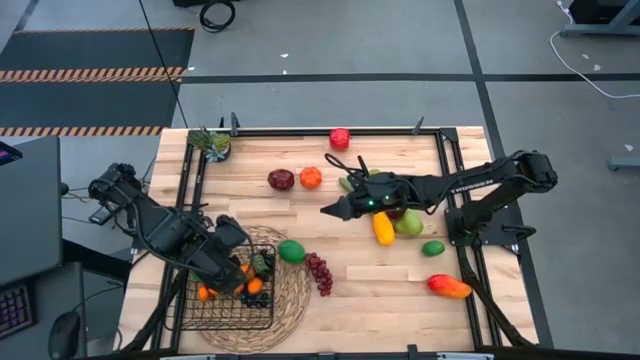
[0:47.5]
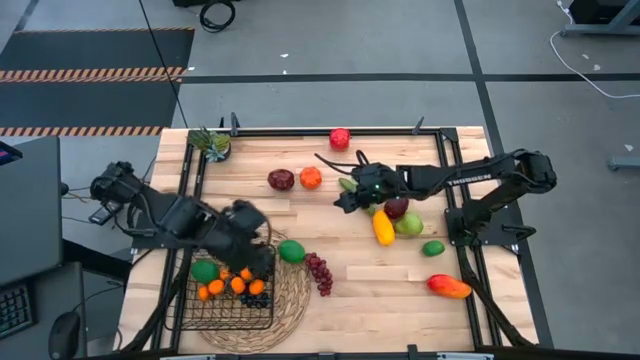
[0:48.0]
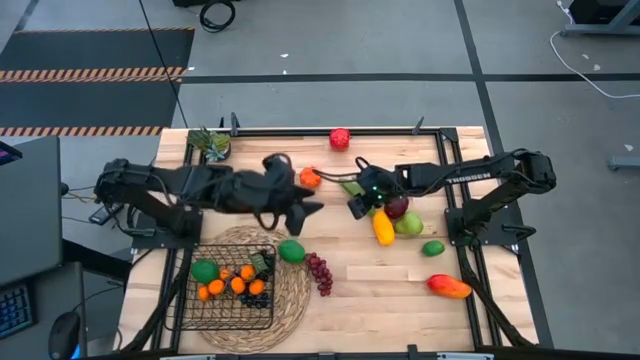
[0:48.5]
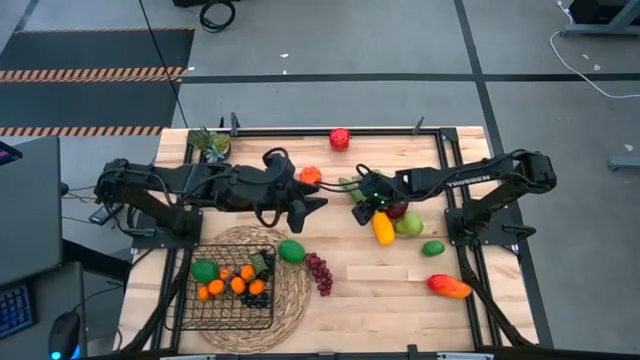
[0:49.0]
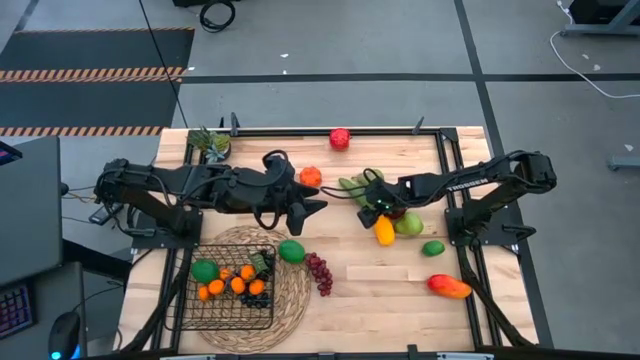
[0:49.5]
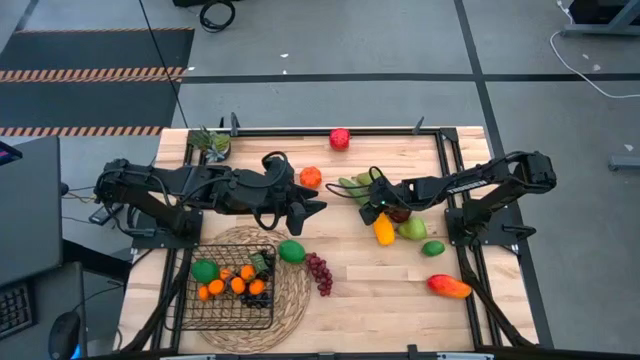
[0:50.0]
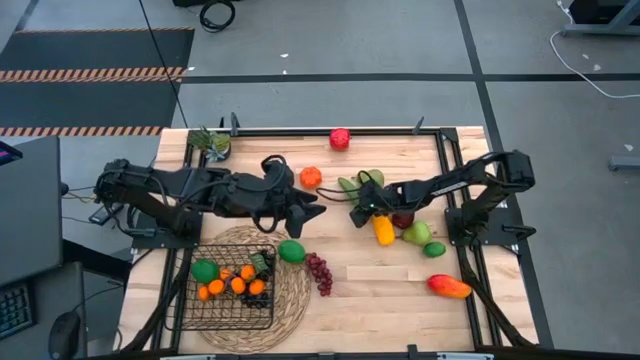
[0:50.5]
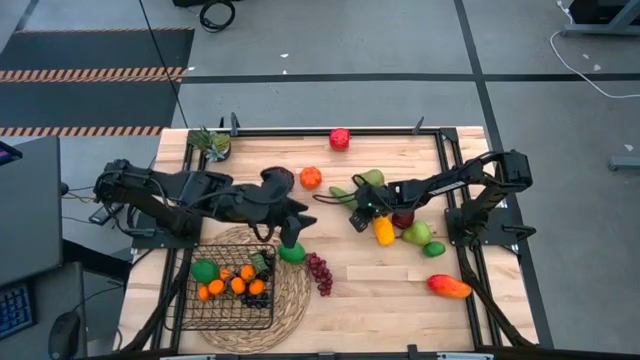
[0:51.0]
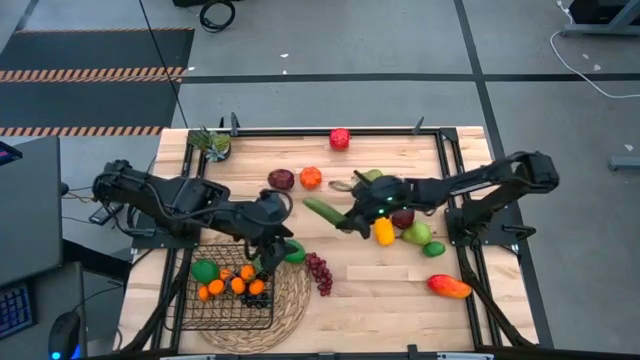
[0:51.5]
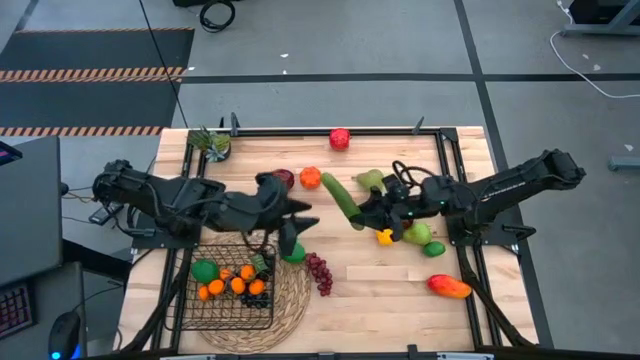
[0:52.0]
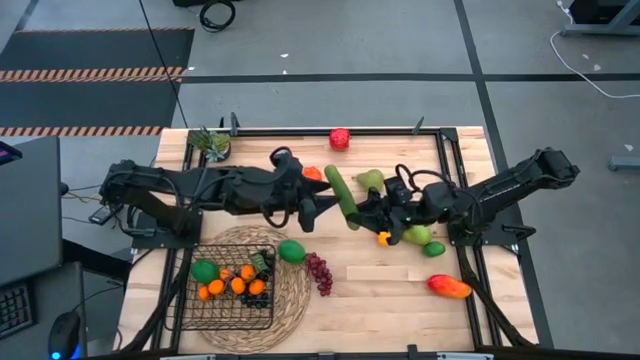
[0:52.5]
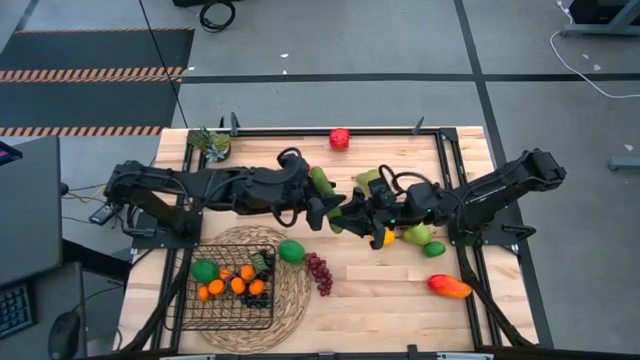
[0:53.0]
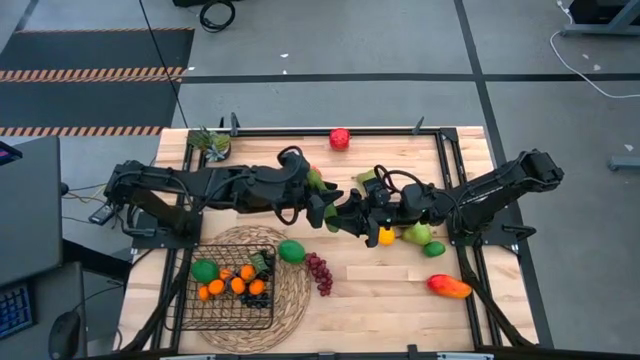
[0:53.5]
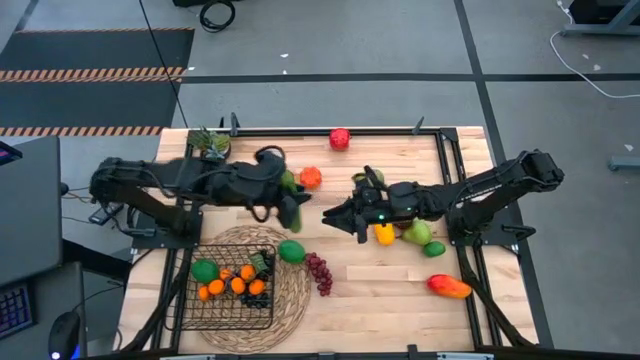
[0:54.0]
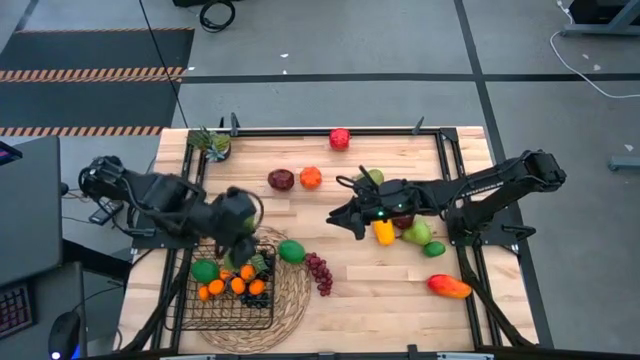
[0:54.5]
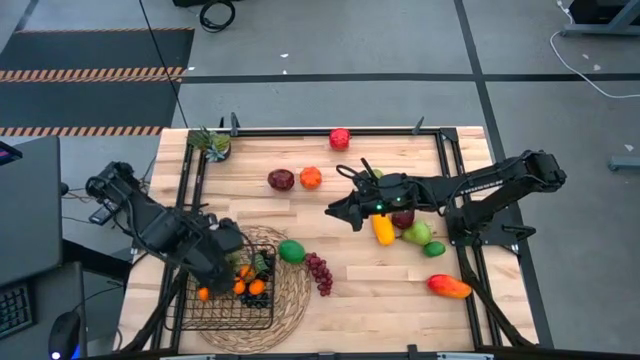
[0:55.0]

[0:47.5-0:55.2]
Task: Build produce basket
Put the cucumber into the black wire basket

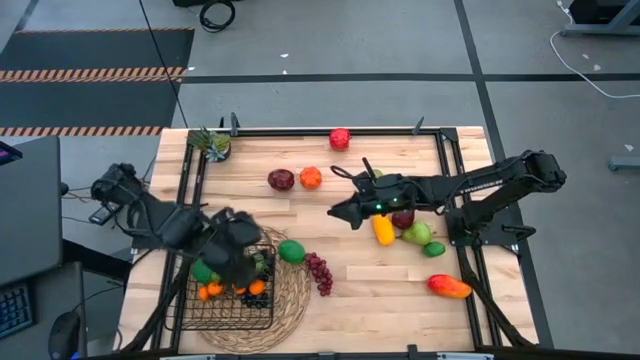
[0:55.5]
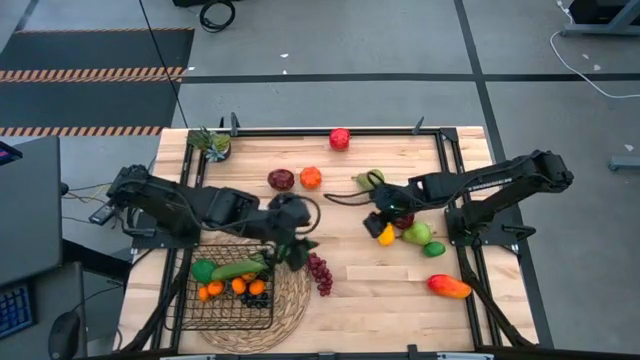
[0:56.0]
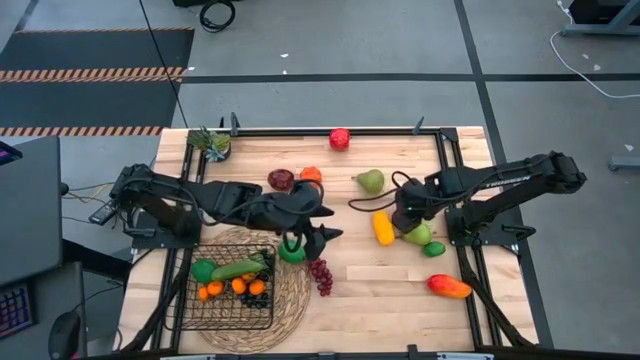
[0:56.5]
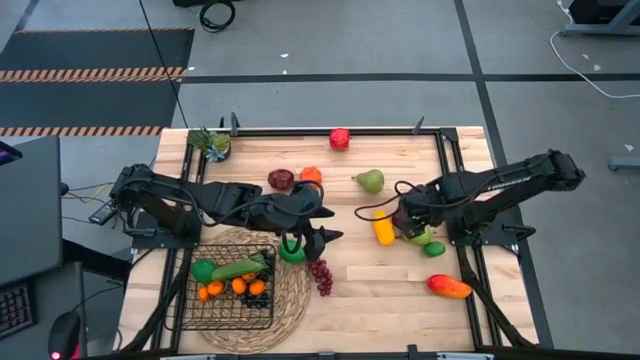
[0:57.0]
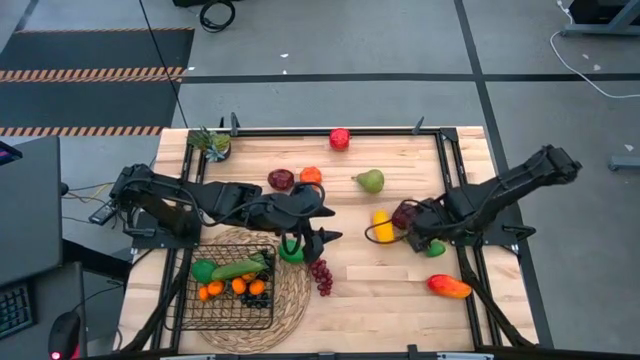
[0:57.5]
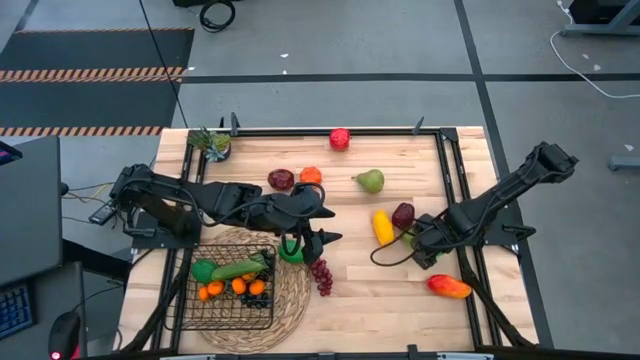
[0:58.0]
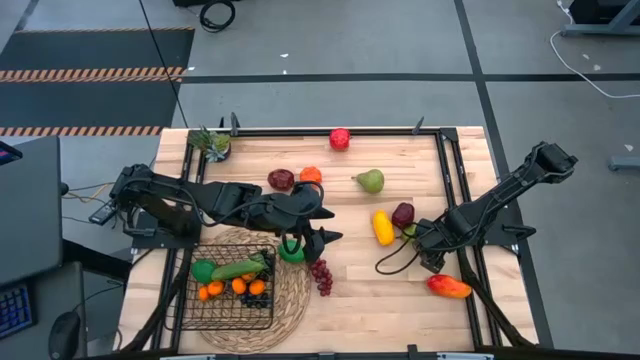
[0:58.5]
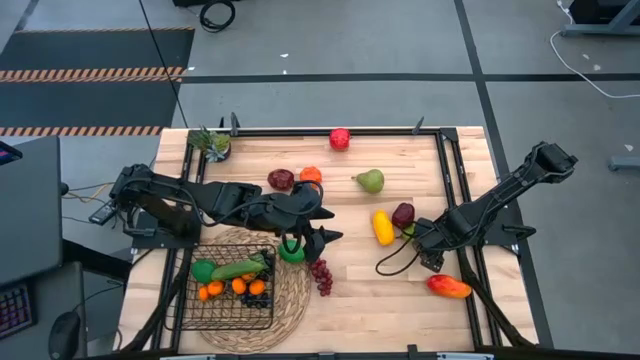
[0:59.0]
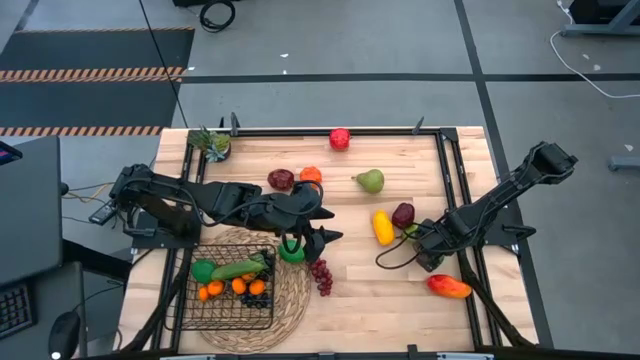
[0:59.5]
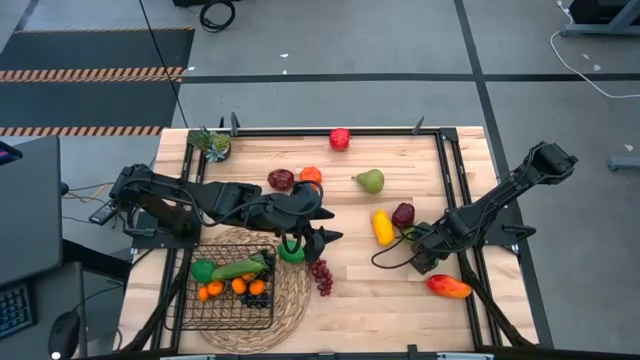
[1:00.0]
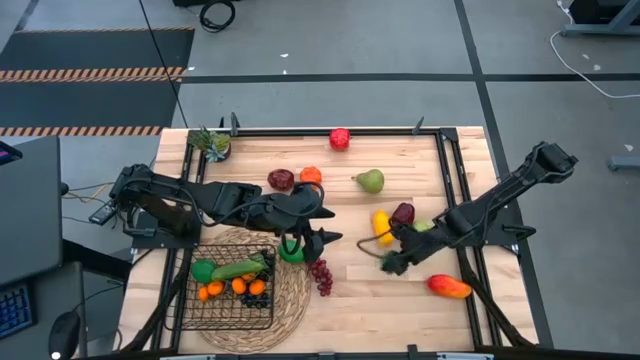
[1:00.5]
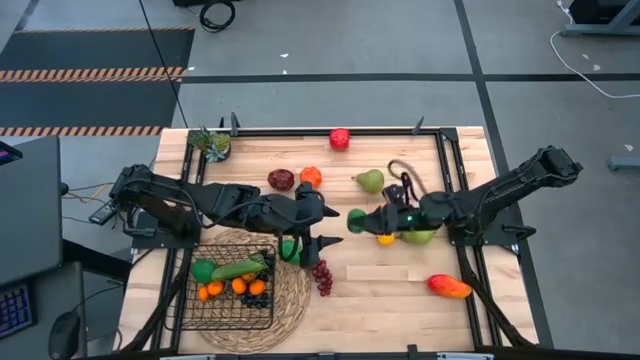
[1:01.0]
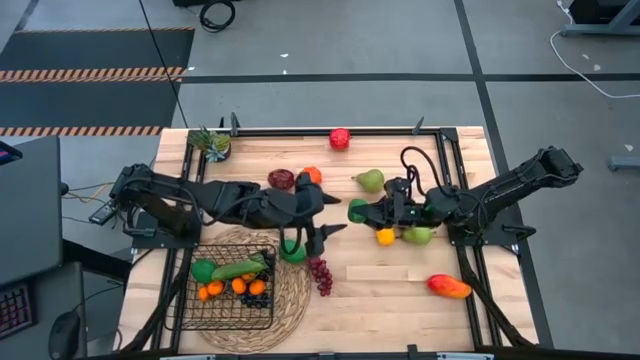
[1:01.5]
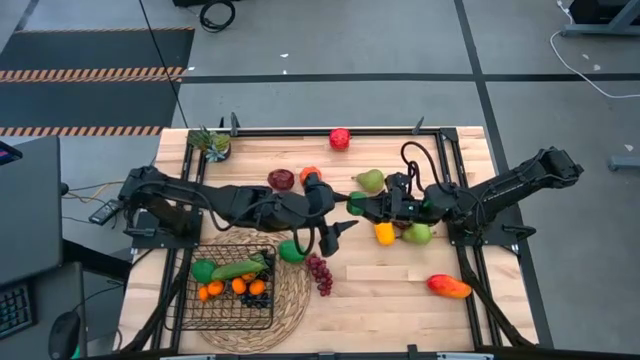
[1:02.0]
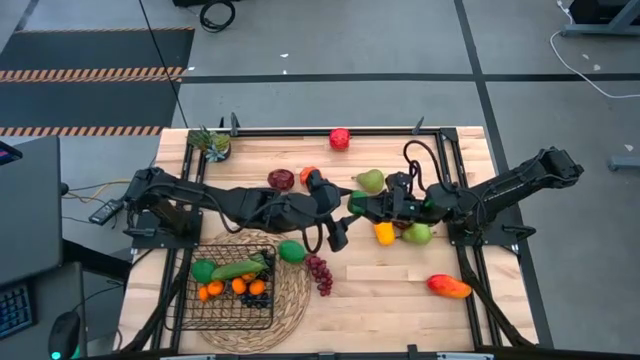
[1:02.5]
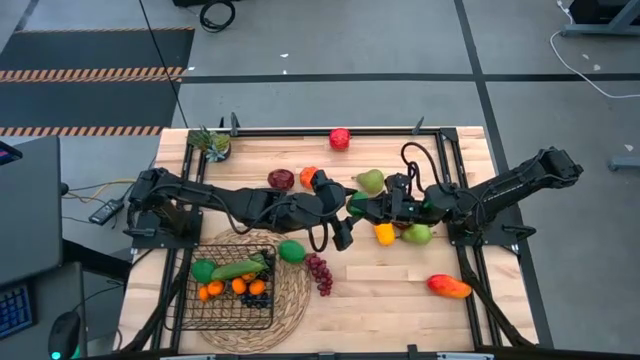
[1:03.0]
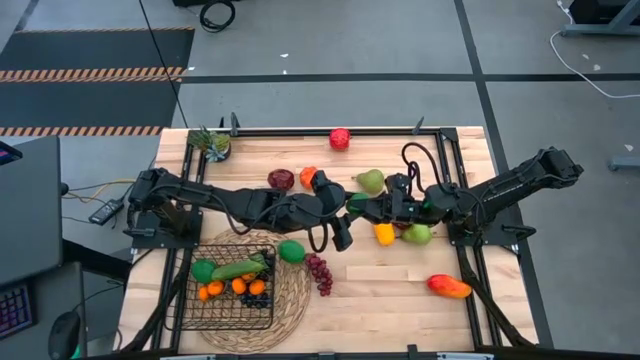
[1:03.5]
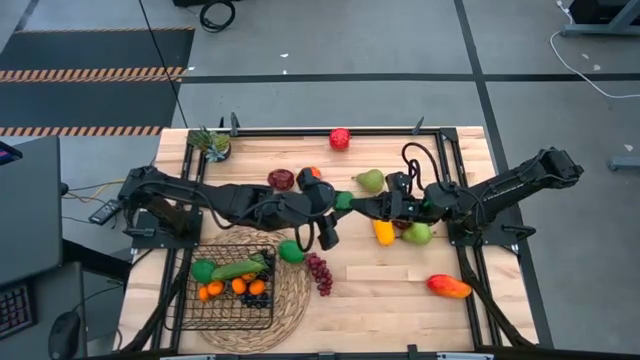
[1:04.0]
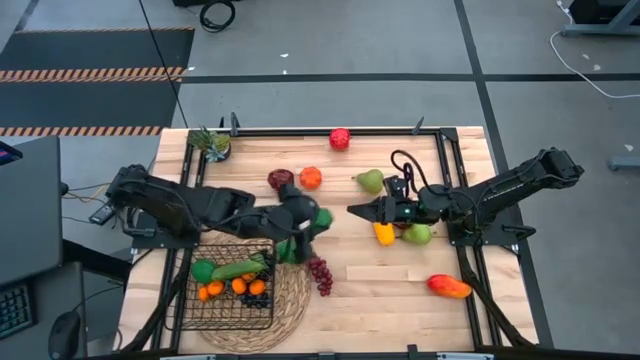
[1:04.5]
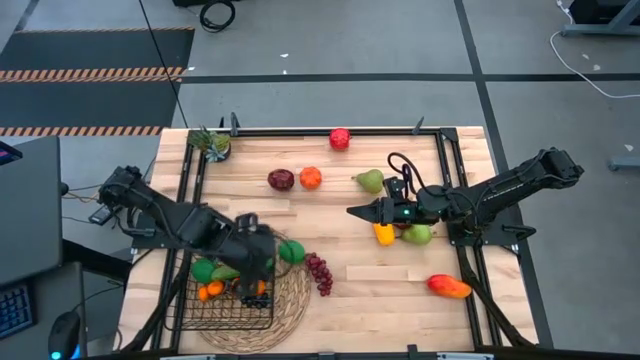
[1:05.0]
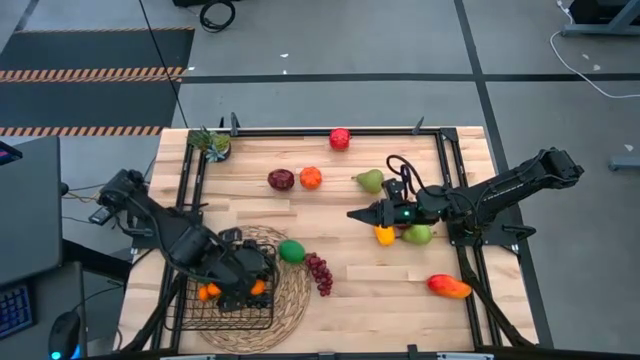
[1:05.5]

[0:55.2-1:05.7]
Put the right lime into the black wire basket

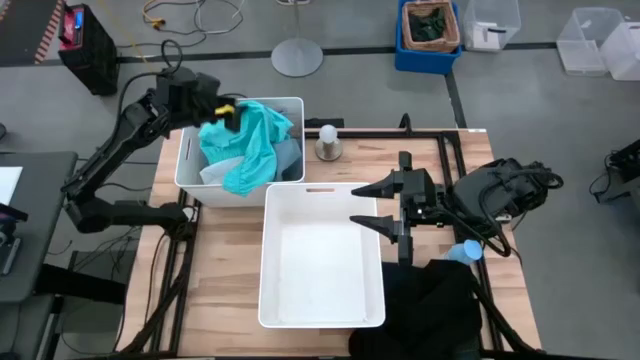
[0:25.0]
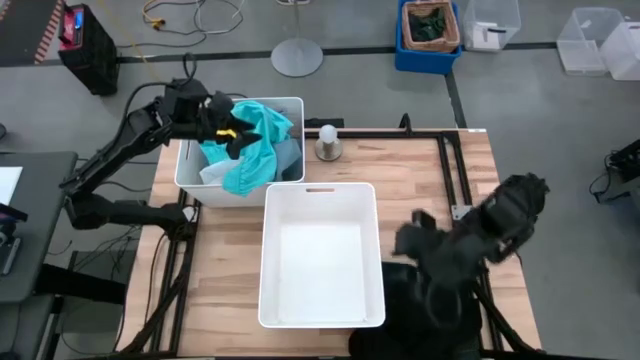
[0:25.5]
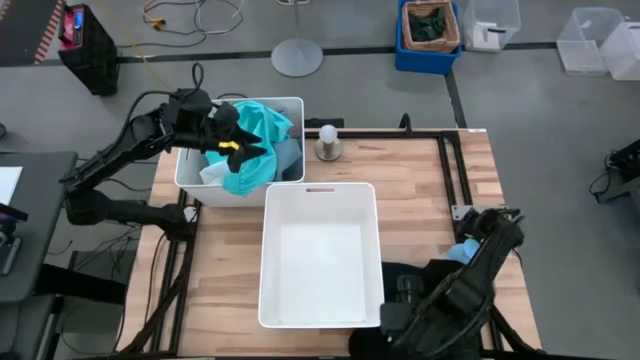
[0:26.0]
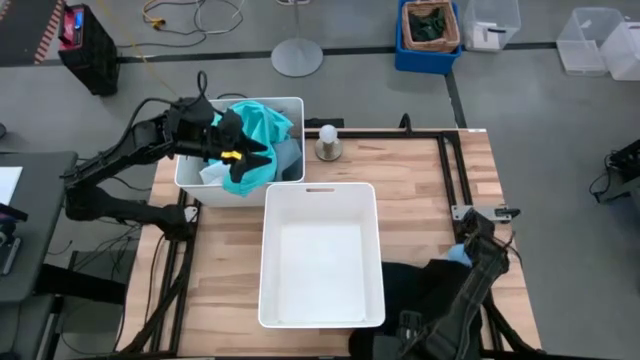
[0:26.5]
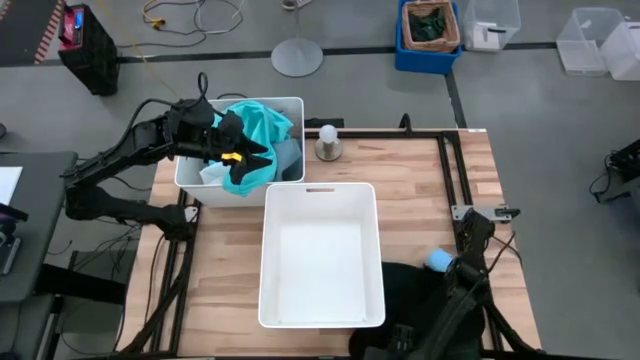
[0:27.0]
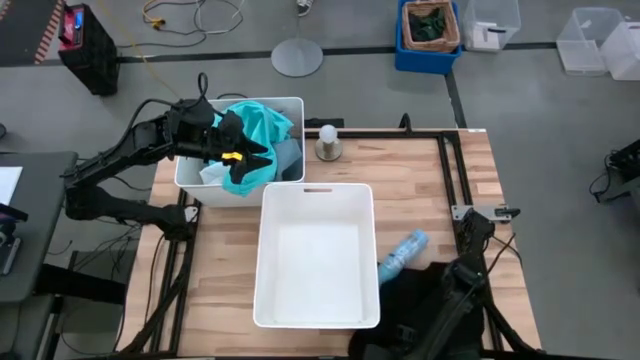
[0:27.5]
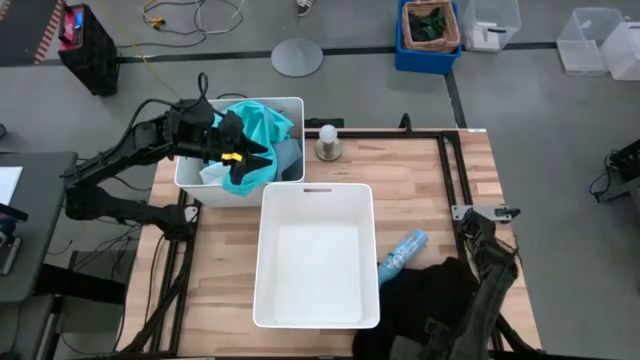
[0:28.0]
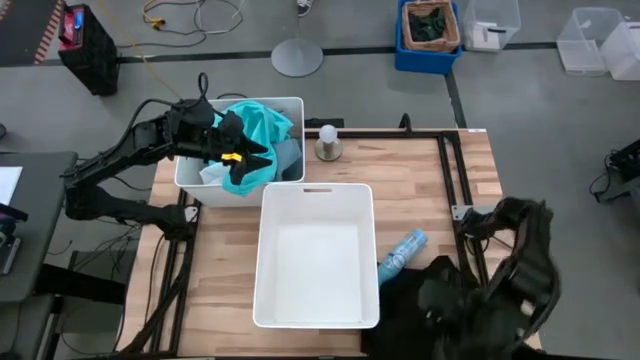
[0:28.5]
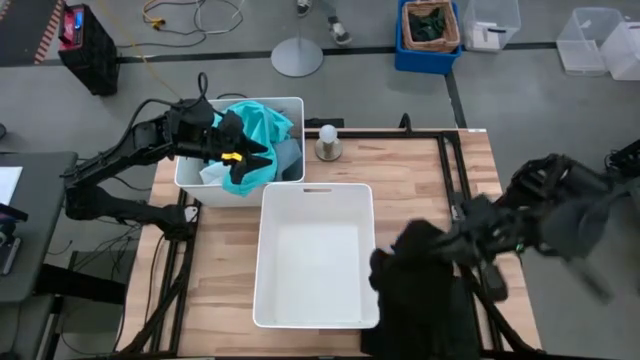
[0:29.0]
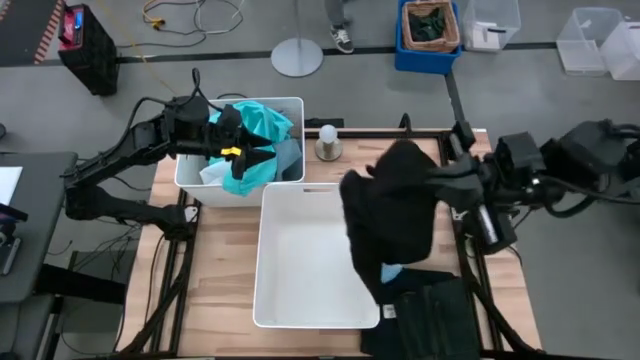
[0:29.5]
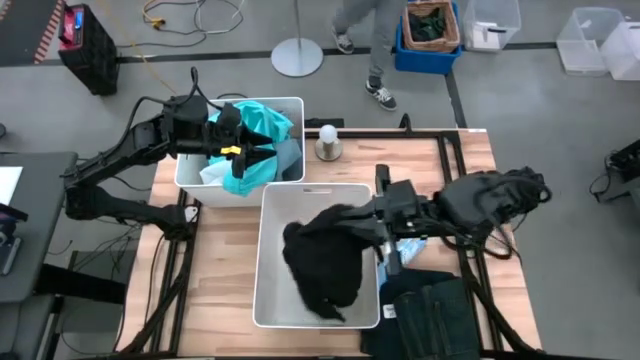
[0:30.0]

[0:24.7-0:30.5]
Task: Sort clothes
Put the black long sleeve into the bottom white bin
